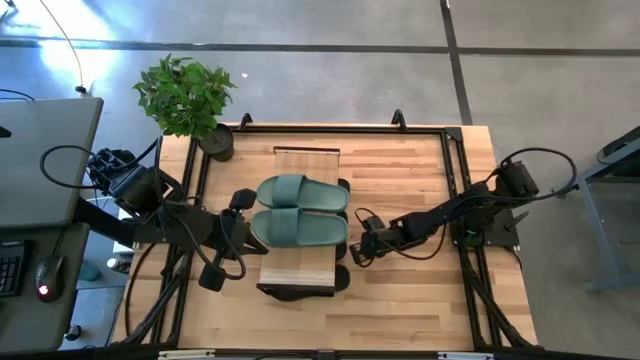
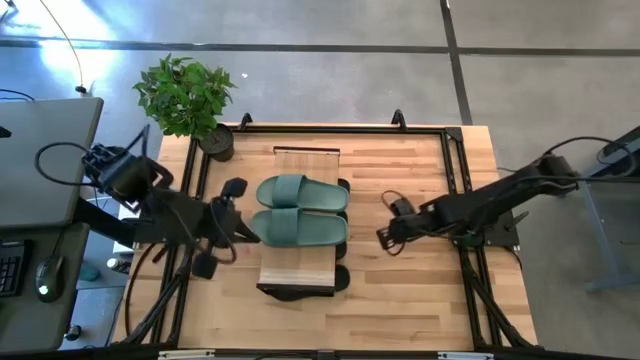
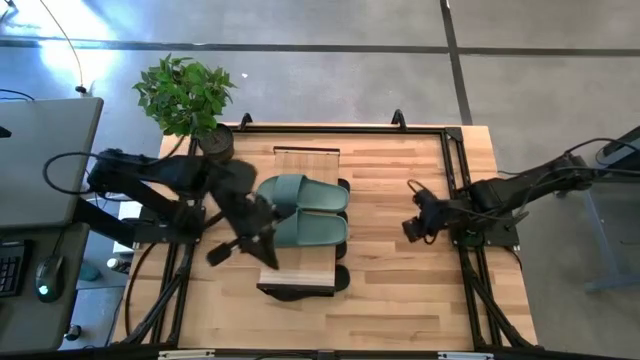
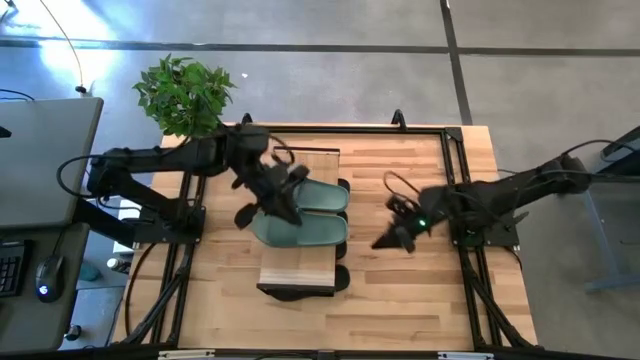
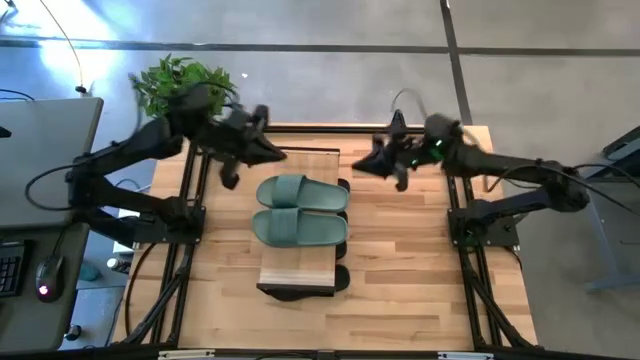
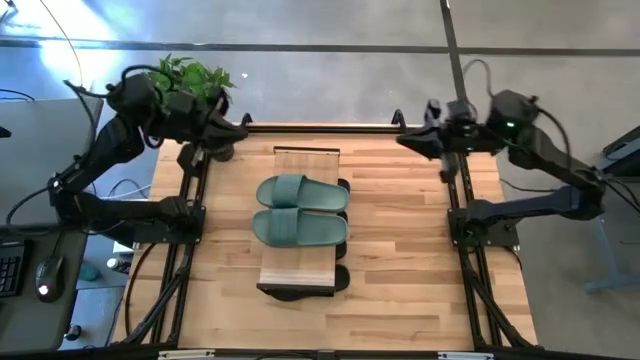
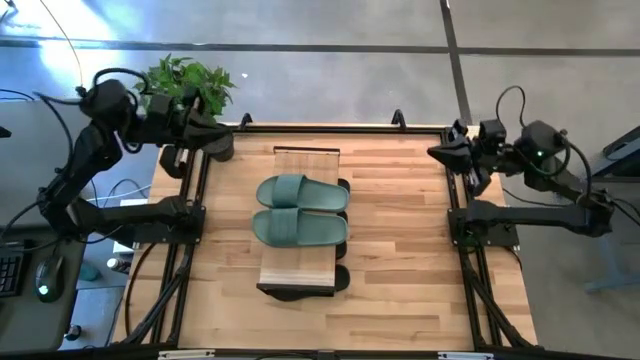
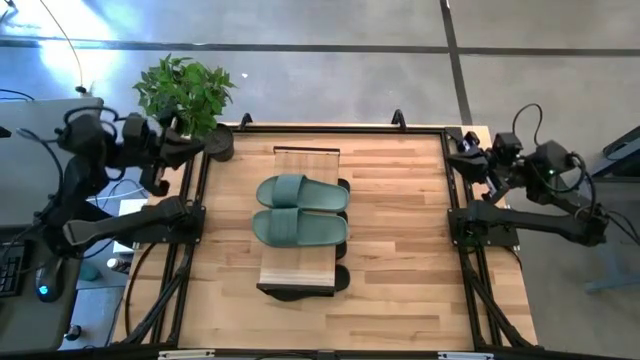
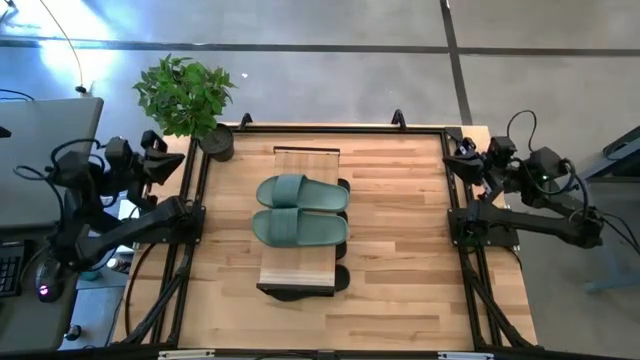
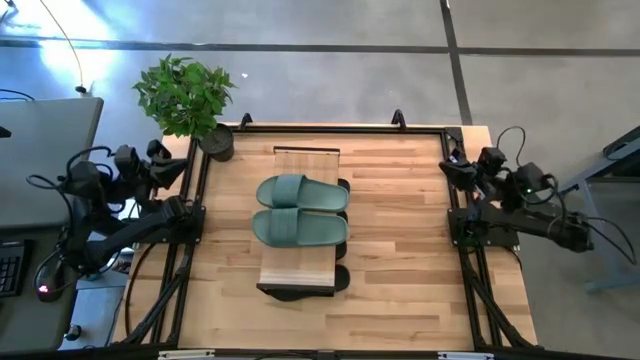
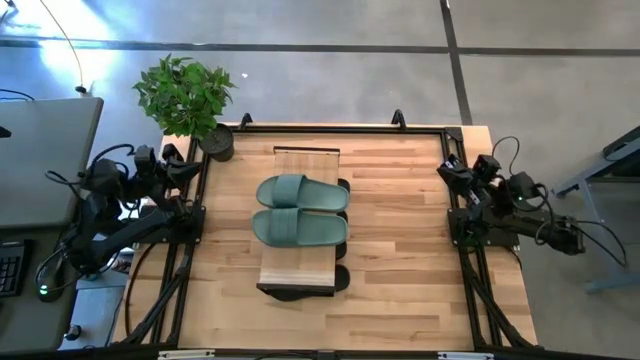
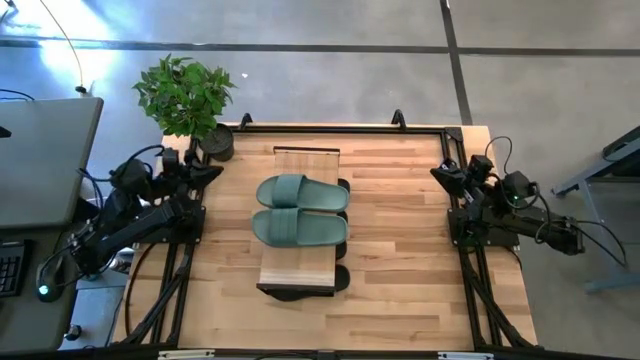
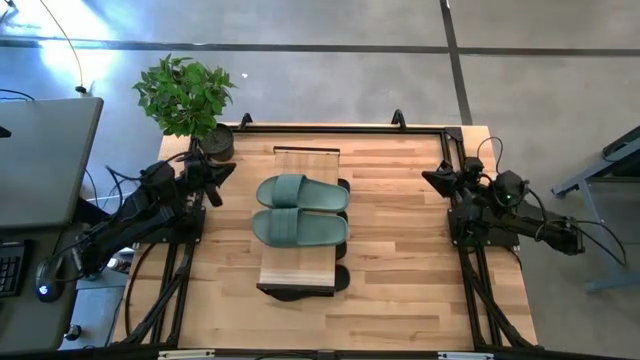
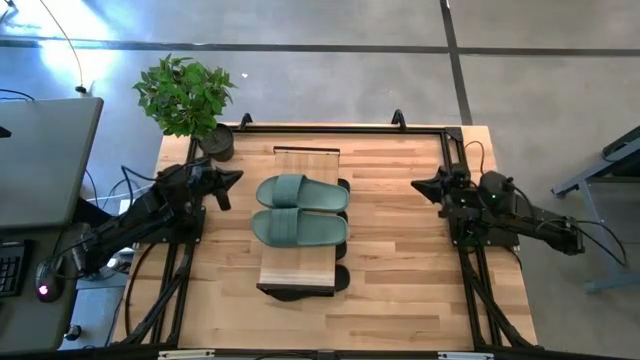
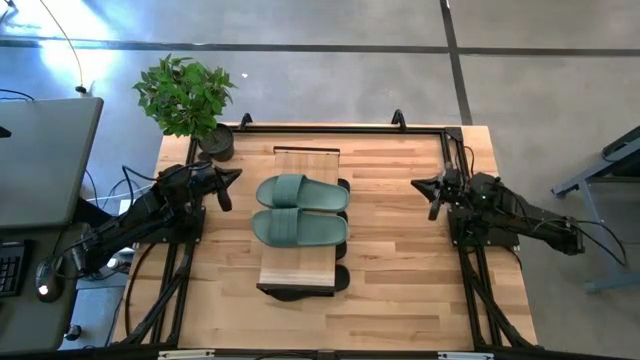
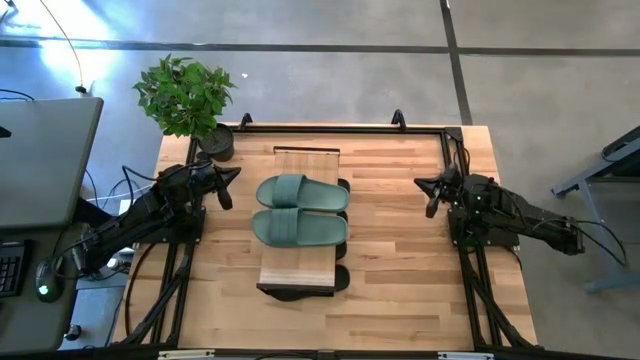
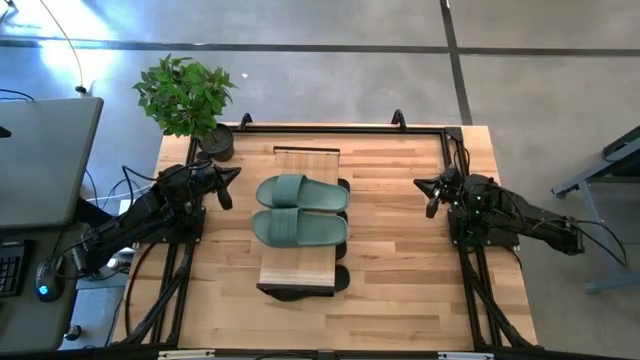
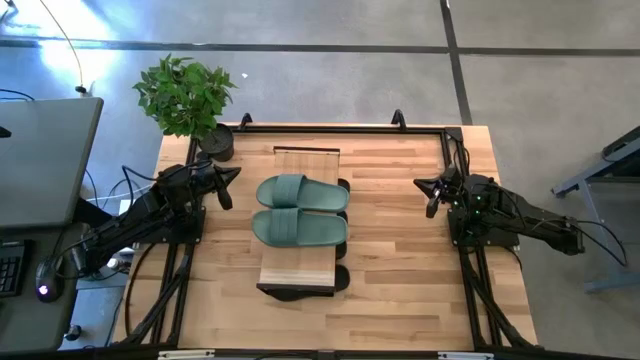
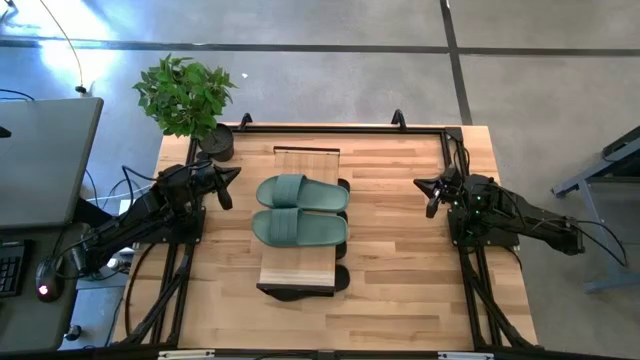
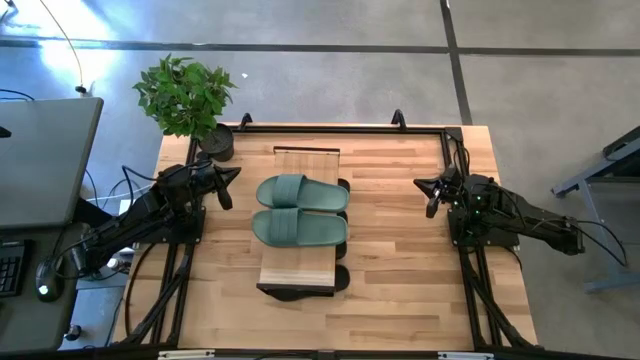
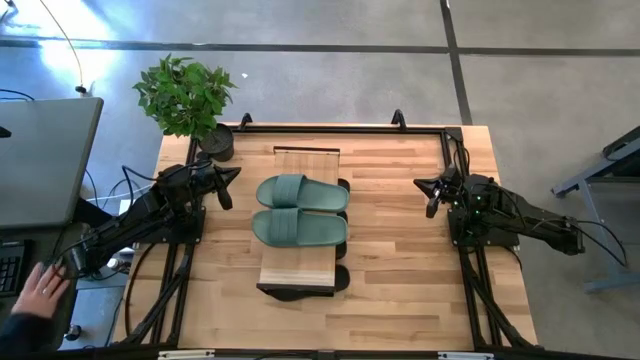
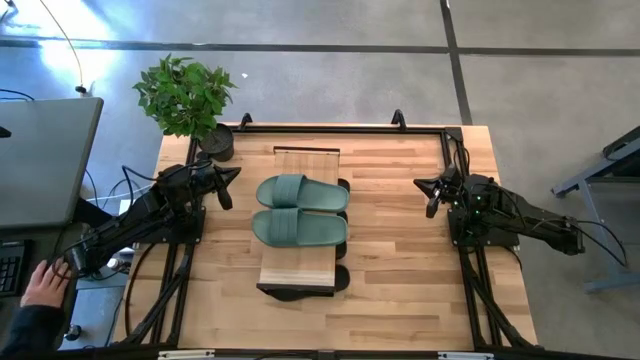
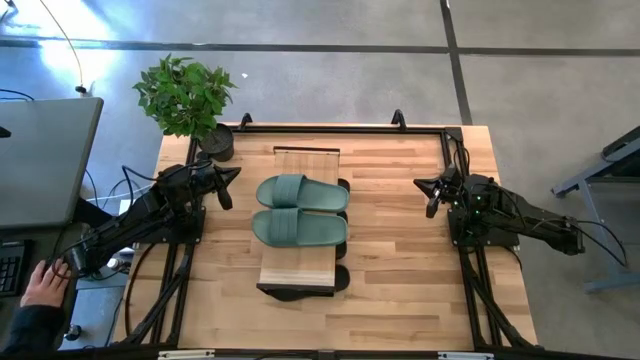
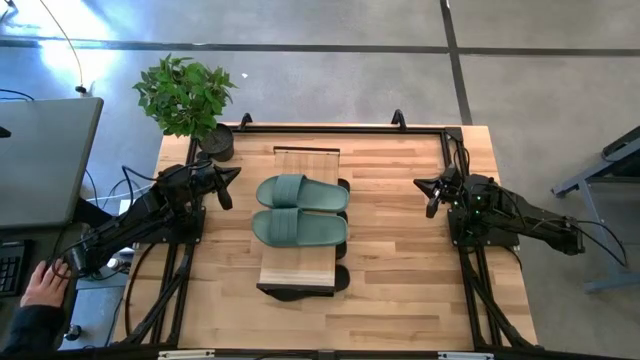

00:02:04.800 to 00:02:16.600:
Task: Pick and place slides into the shelf
Return to Home Position

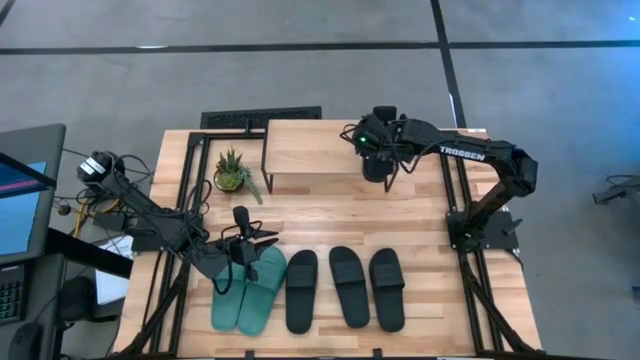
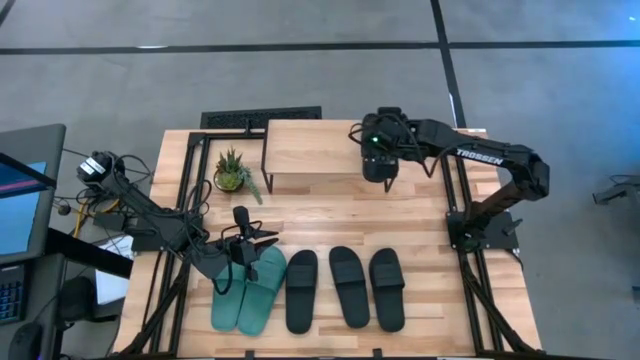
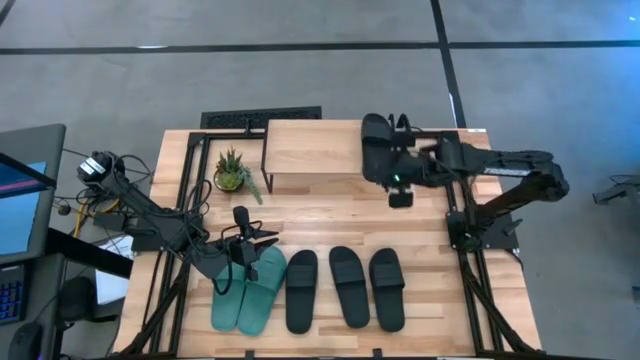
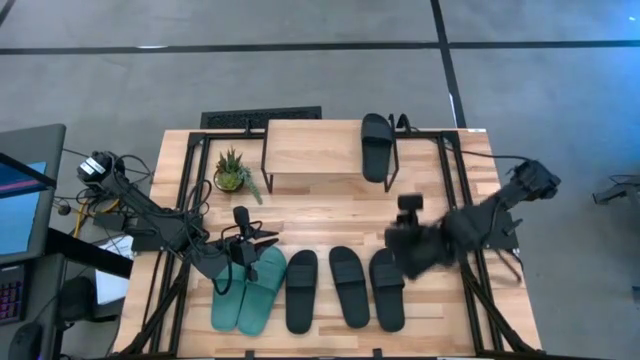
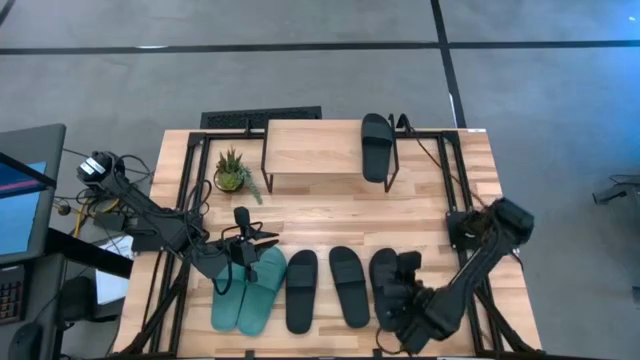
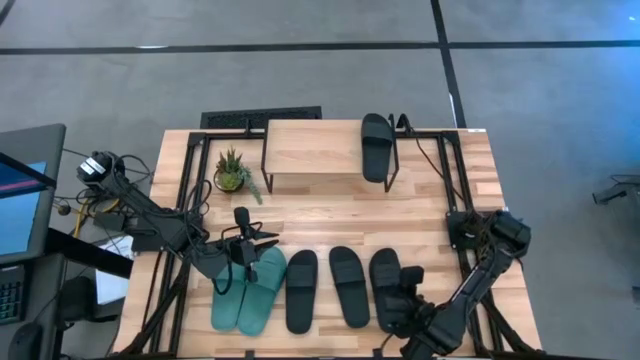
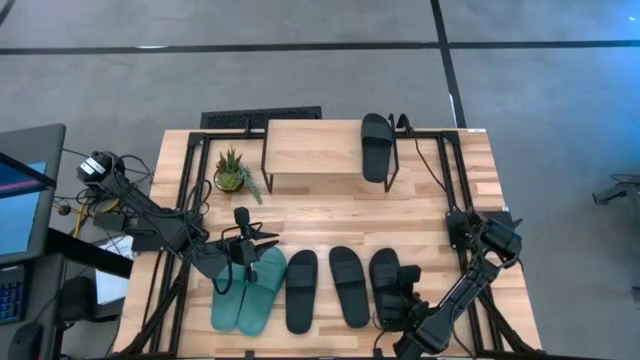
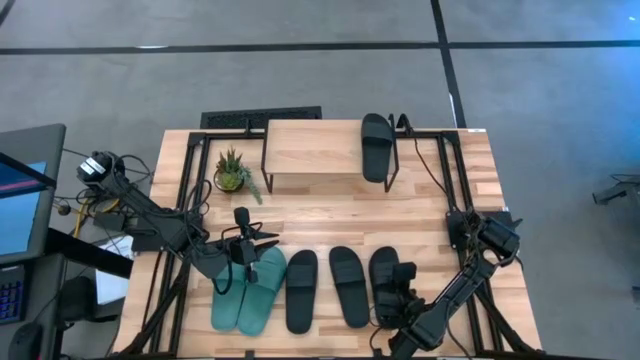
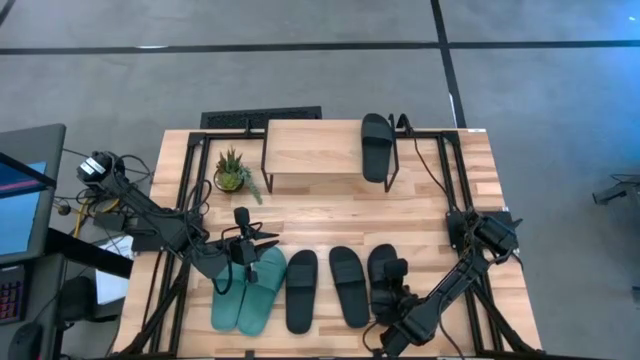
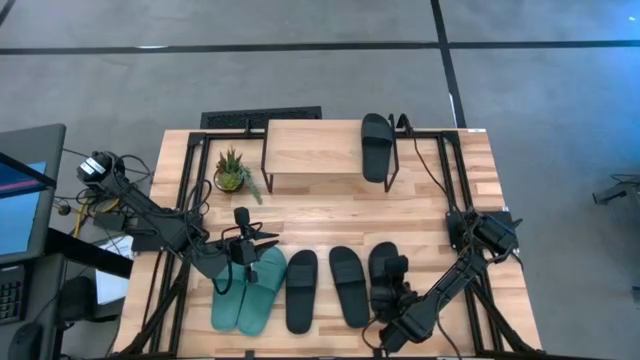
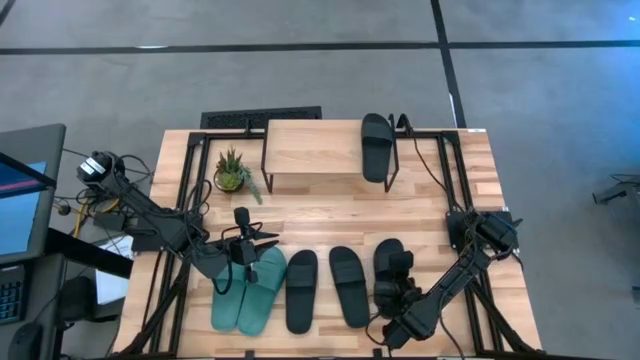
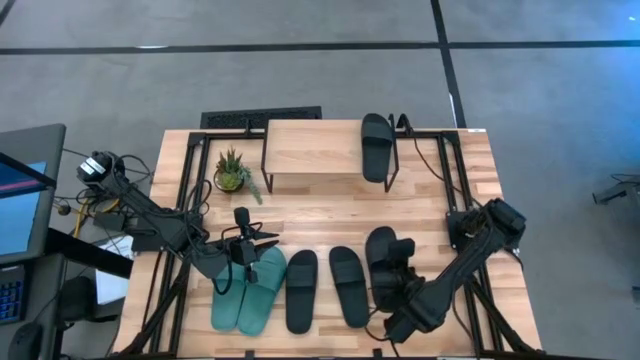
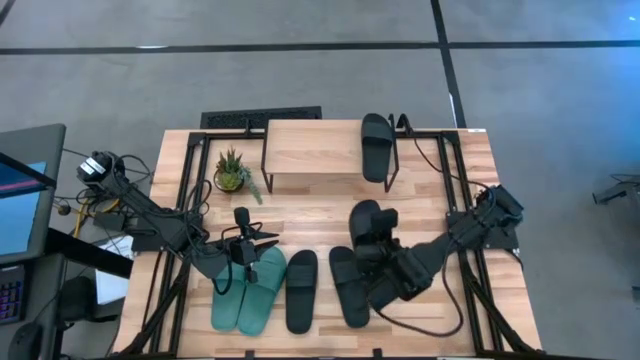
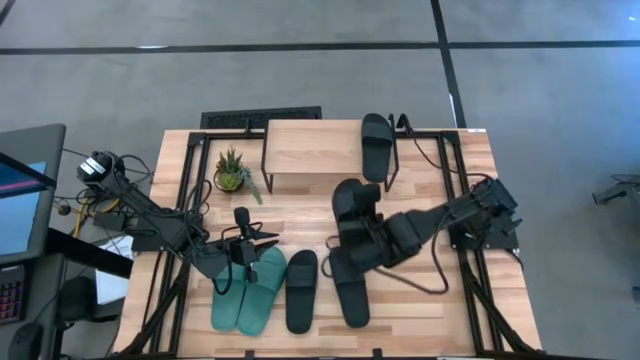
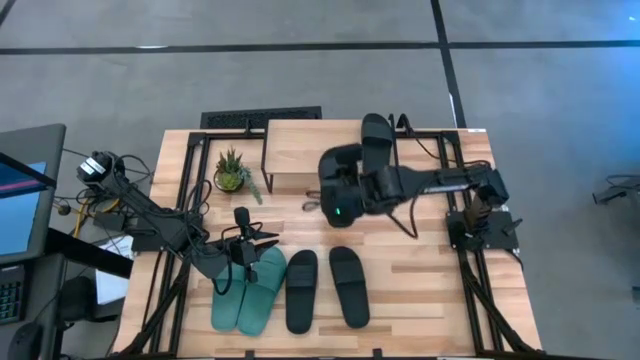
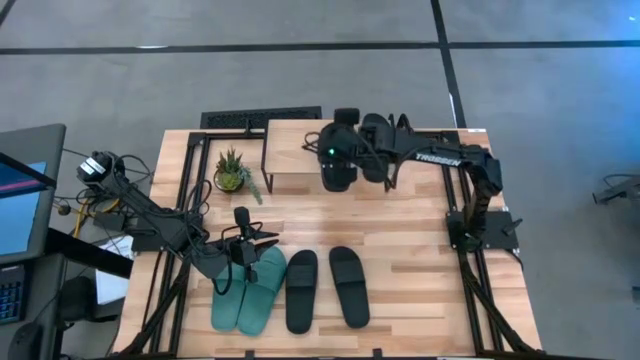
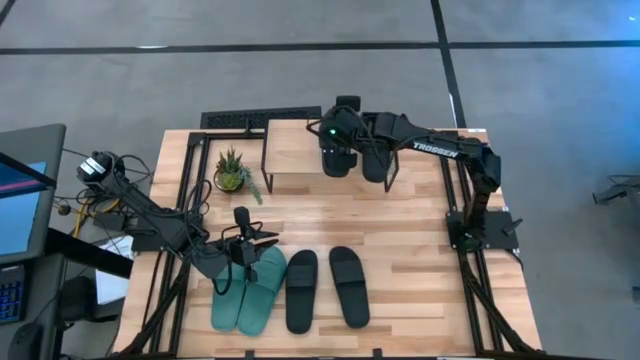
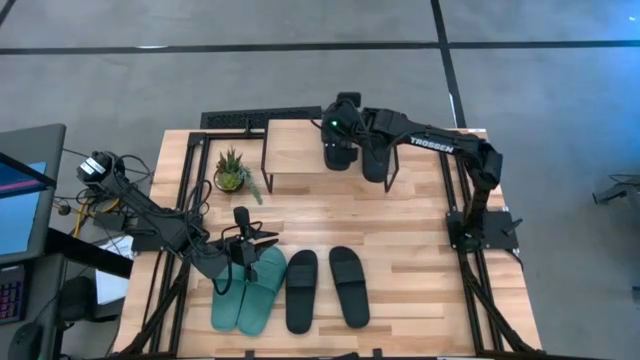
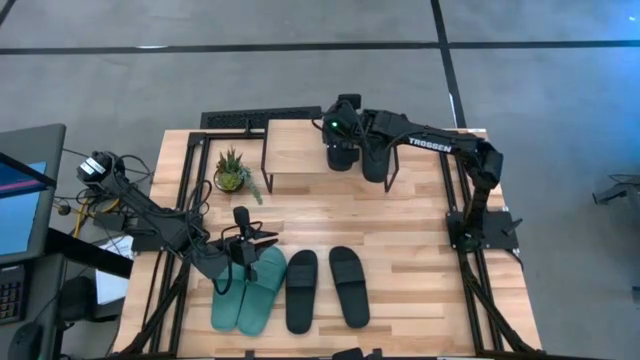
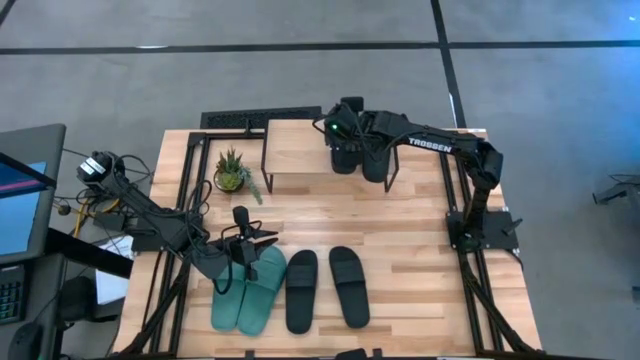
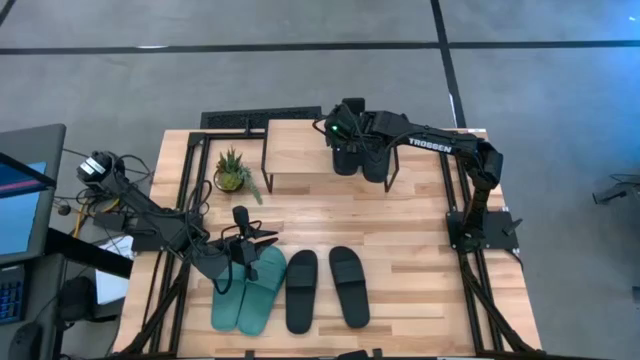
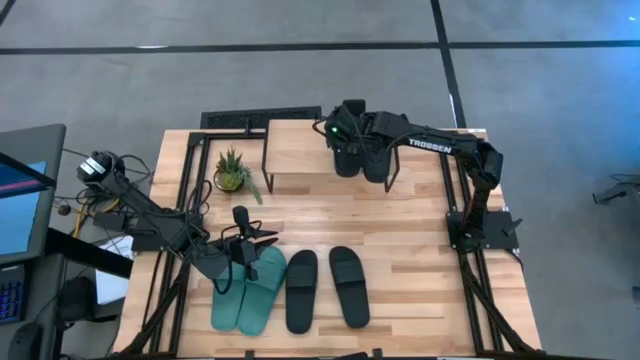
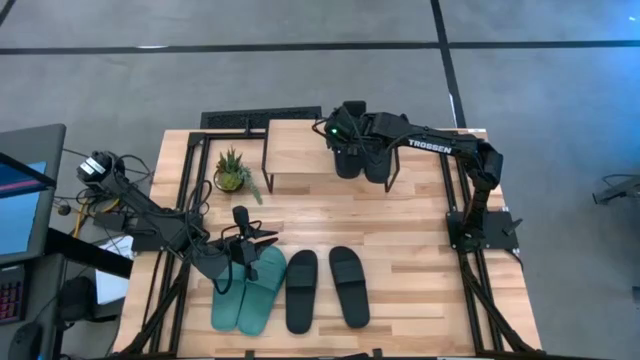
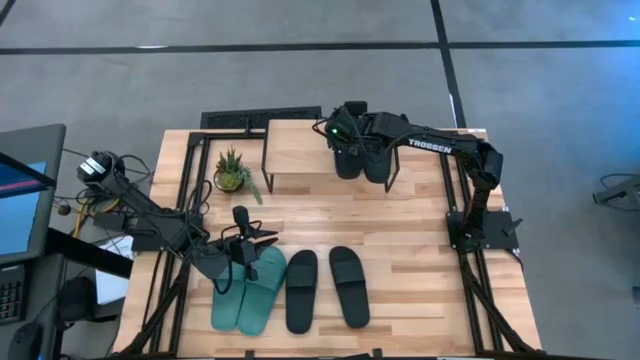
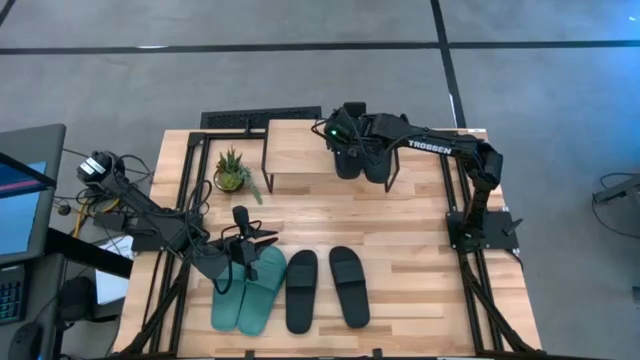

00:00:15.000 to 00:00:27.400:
Task: Pick and place slides into the shelf
Put the black slipper on the shelf
